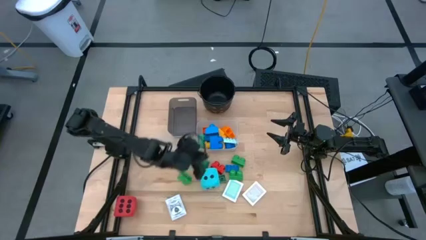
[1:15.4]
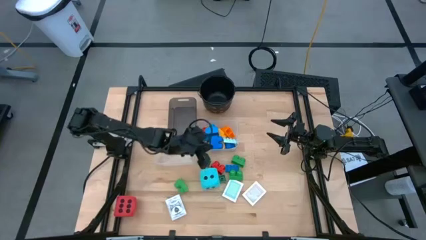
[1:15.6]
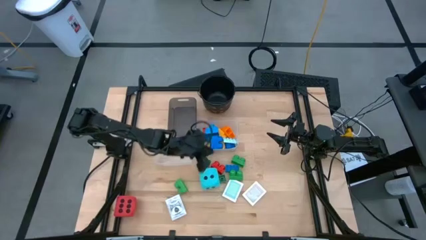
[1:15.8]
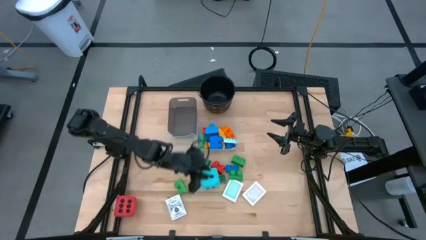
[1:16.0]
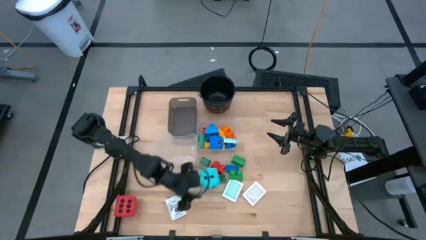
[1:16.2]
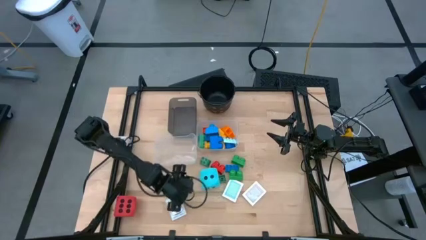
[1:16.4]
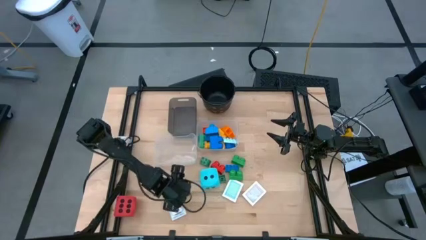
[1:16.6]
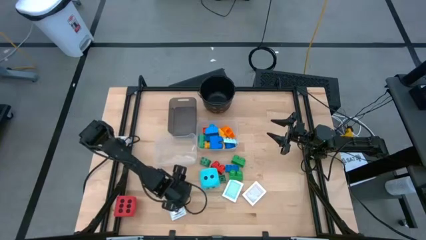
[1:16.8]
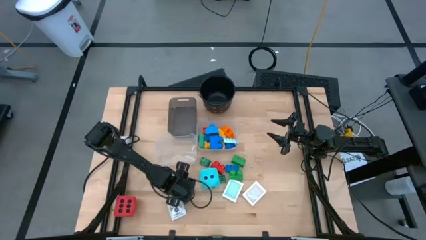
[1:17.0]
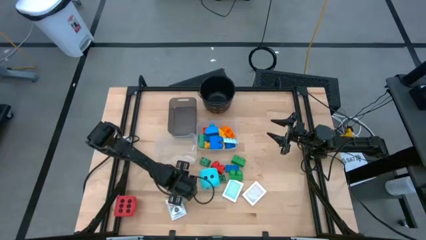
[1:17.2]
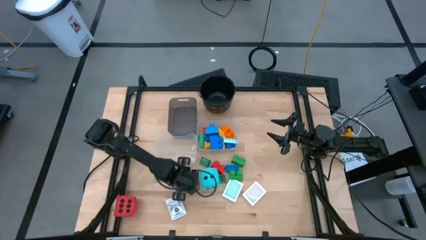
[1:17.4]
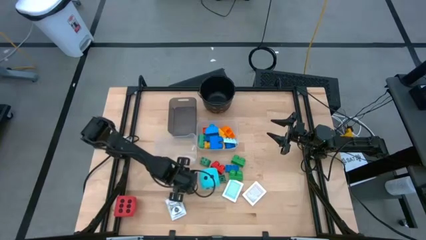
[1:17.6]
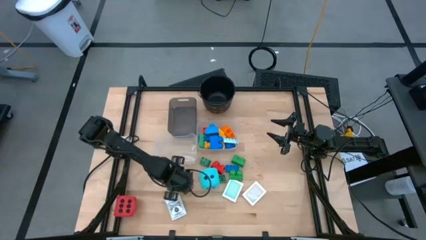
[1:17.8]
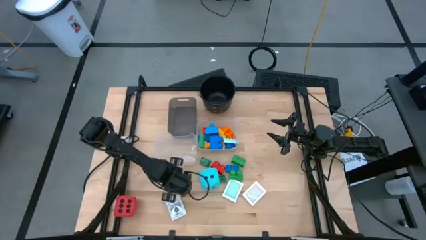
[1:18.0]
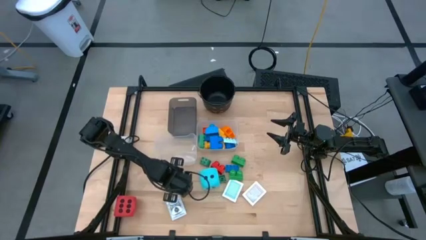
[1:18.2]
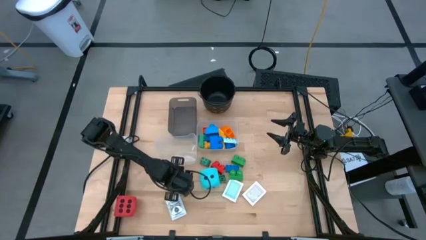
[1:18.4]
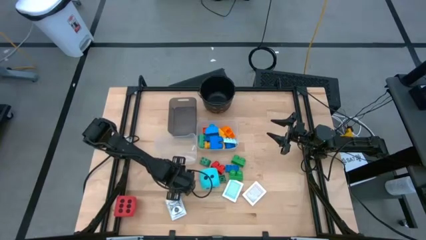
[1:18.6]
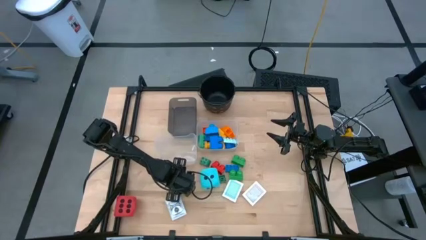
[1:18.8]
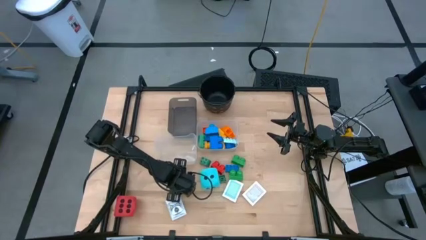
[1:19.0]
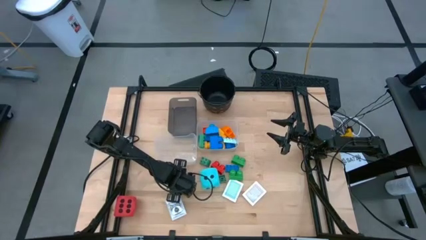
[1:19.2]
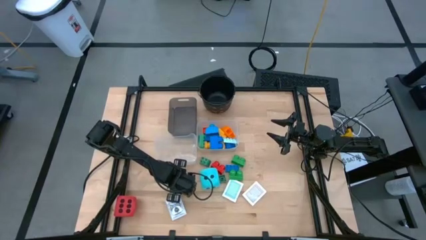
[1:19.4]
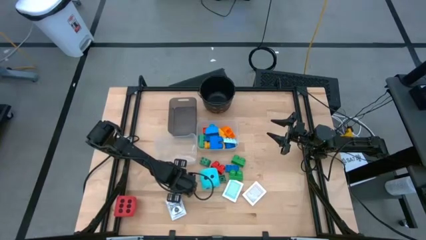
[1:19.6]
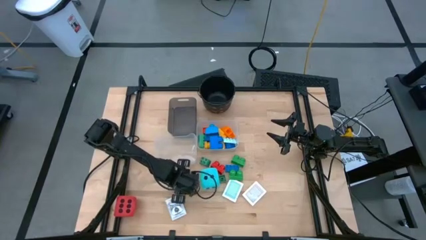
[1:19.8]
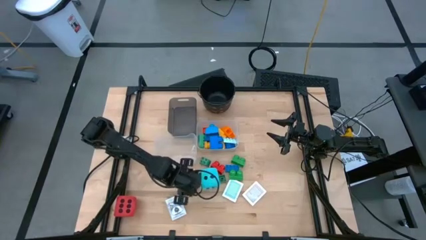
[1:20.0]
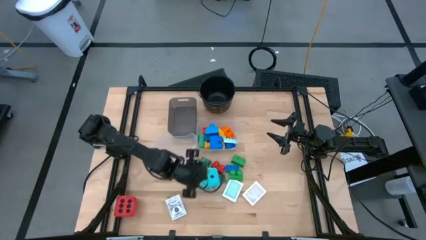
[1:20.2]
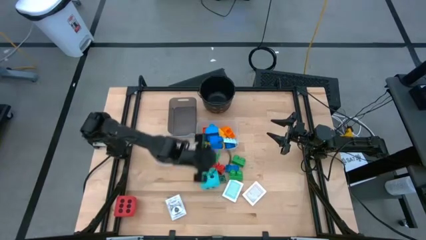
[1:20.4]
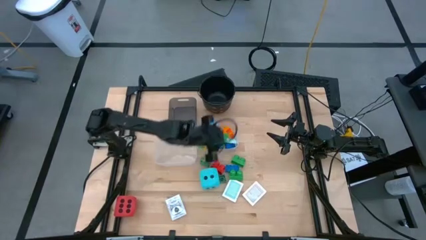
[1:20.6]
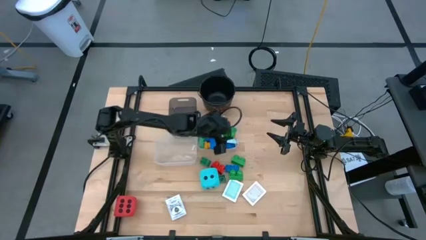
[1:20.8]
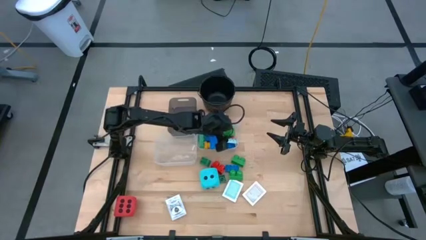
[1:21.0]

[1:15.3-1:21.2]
Task: Pick & Place Toys
Put the green game piece into the right transparent bin

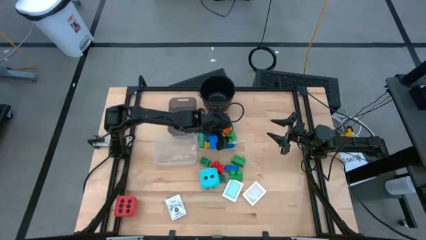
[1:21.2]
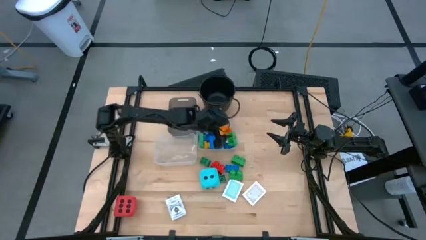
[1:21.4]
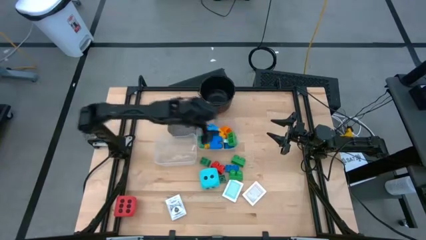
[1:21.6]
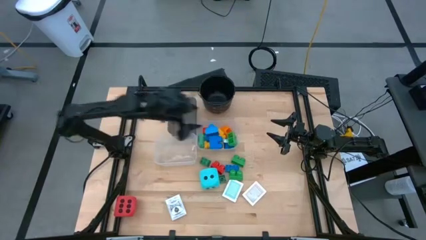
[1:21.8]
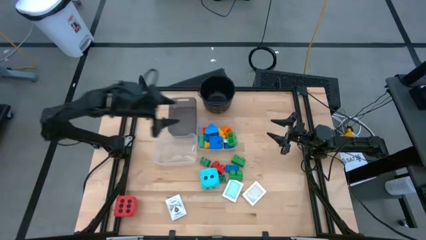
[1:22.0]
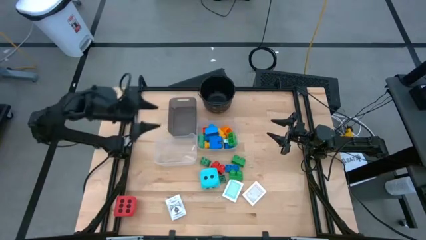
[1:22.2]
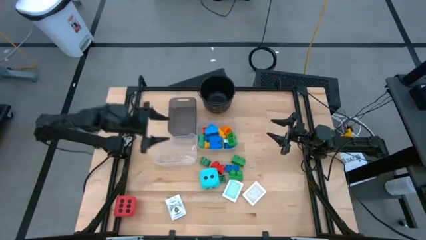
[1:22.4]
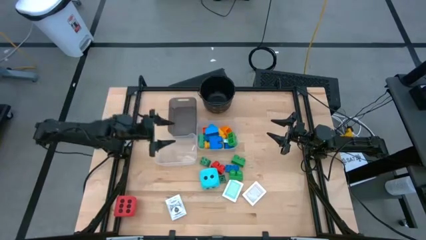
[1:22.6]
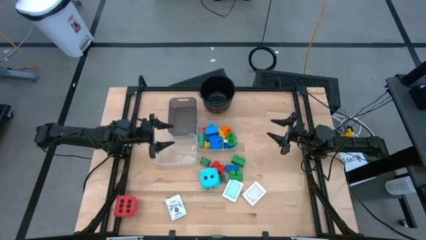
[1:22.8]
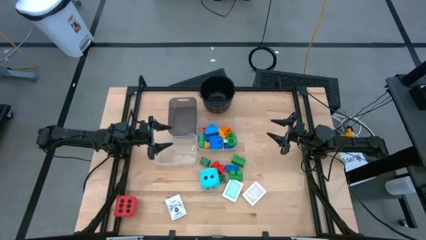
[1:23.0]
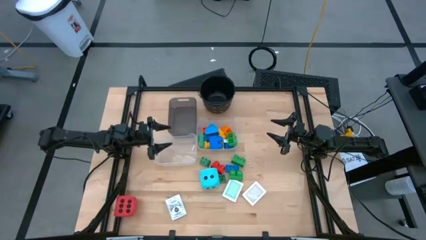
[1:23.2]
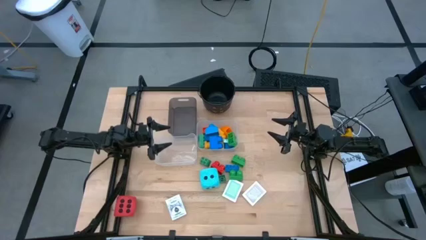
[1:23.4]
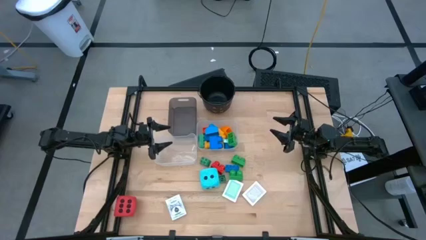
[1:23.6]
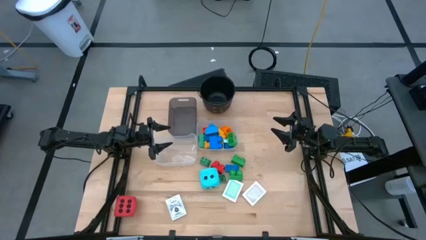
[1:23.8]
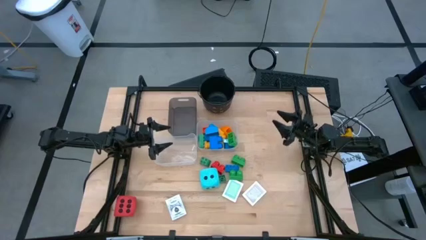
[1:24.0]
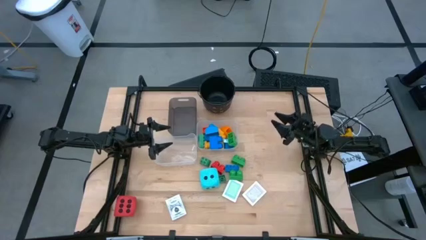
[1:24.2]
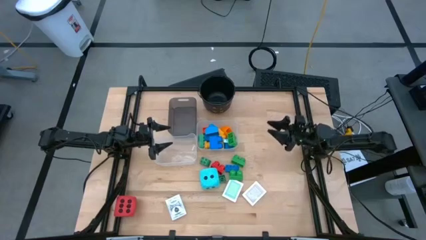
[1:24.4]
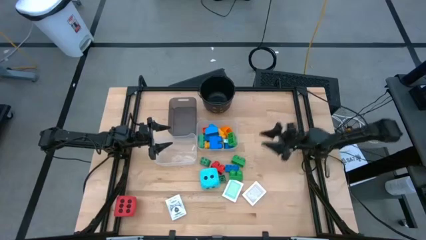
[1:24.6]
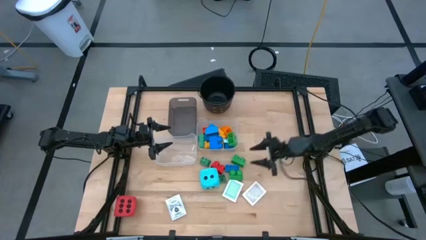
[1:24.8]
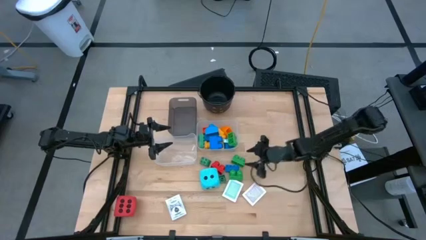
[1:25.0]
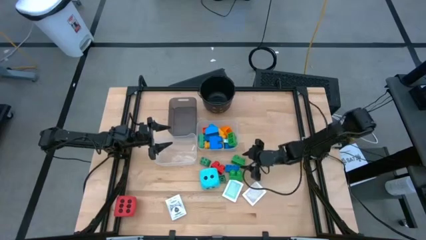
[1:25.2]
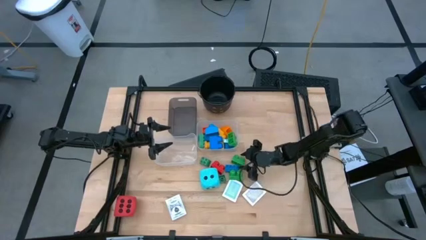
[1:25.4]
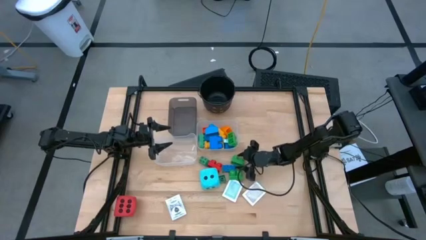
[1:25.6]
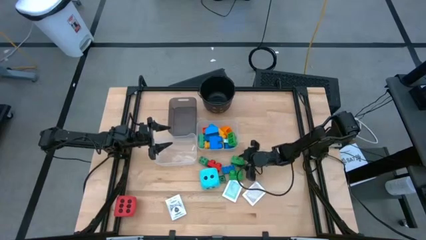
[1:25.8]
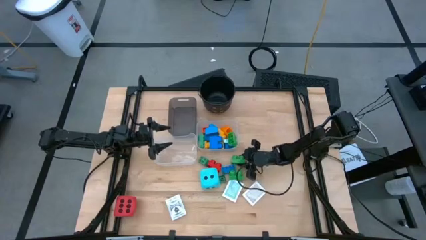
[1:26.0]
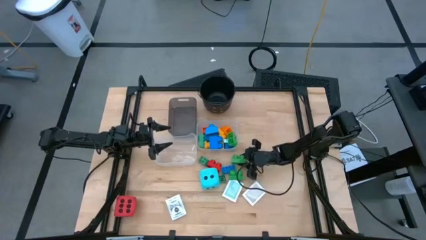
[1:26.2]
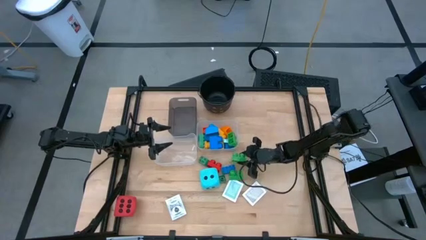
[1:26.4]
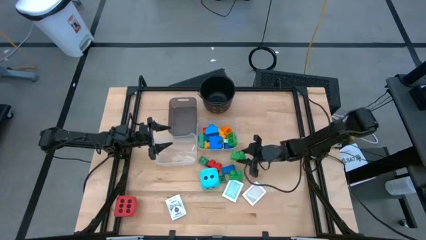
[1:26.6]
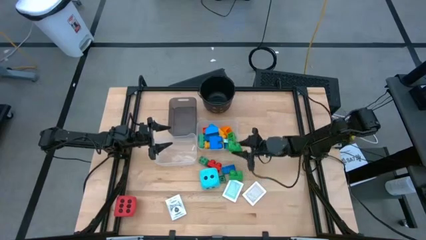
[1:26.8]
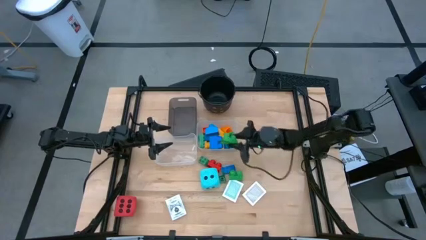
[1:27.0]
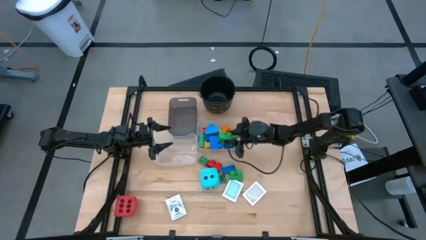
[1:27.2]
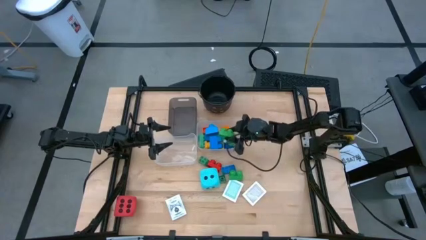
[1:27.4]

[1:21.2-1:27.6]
Put the green game piece into the right transparent bin

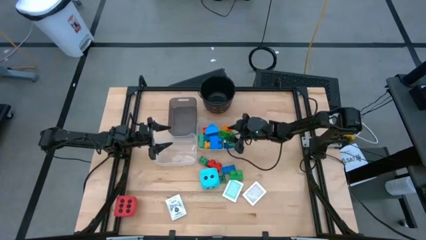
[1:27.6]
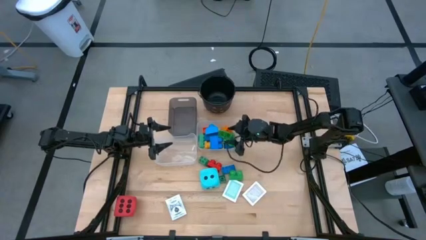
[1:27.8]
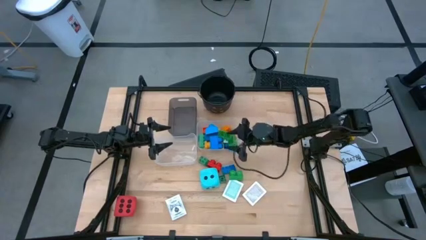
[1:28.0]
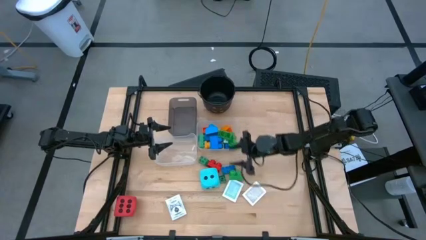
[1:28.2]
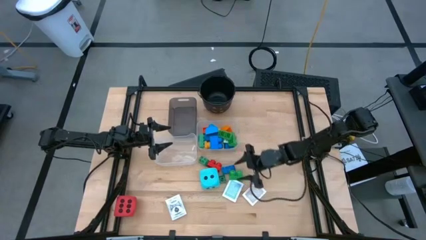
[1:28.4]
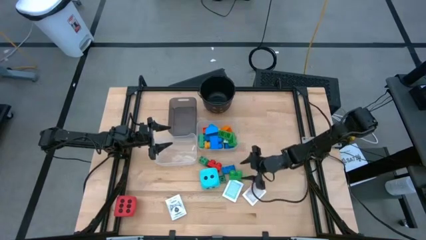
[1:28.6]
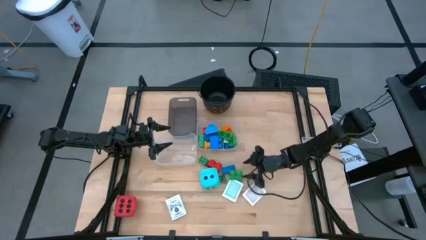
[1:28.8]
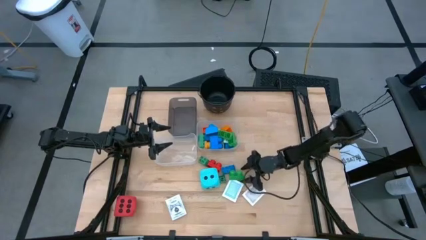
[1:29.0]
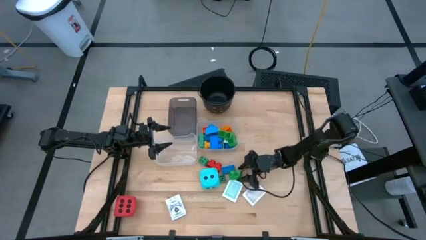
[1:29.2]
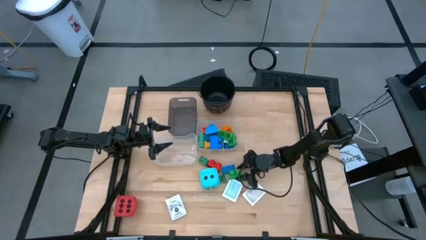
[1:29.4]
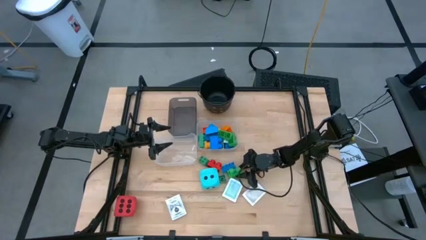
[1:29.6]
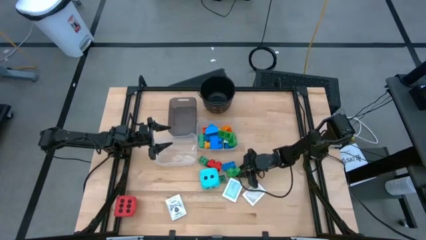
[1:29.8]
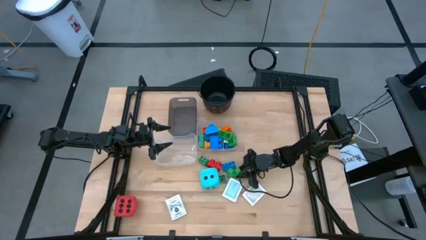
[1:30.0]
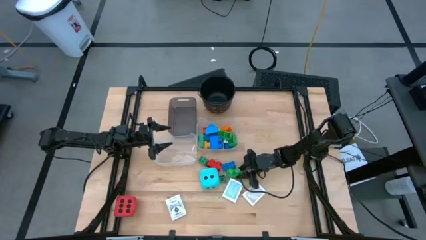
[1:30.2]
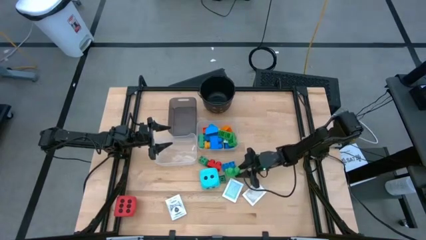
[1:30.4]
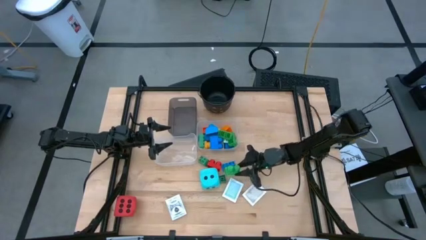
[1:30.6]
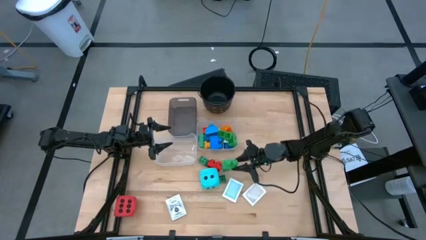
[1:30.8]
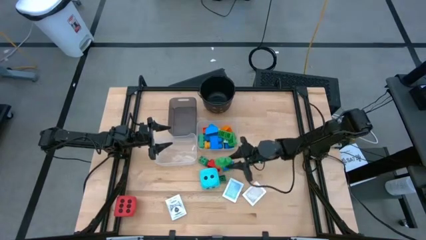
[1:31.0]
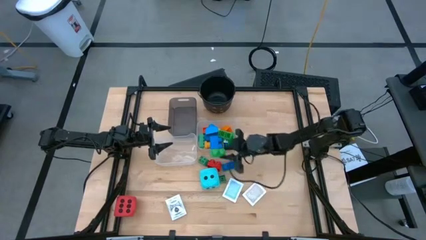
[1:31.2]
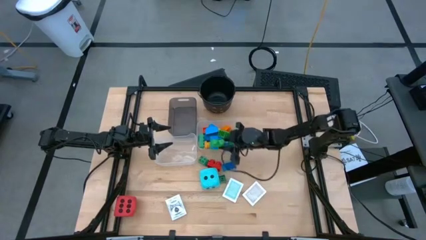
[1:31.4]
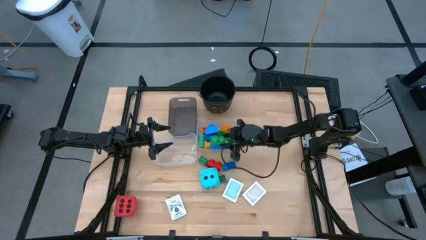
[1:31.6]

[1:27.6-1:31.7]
Put the green game piece into the right transparent bin
